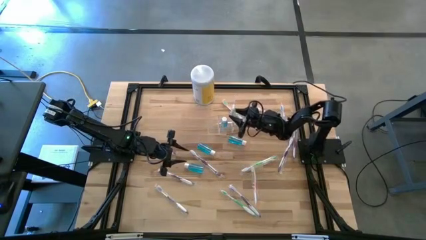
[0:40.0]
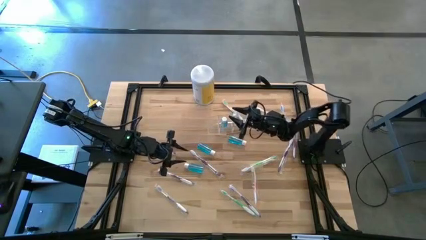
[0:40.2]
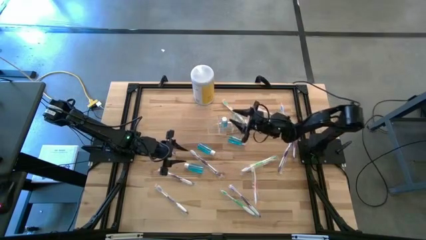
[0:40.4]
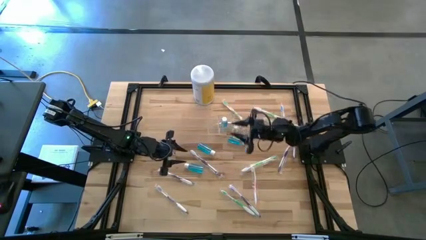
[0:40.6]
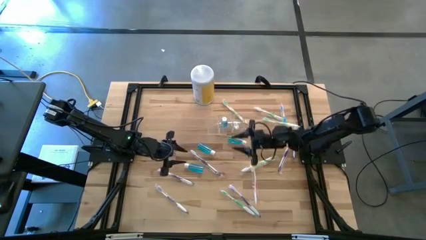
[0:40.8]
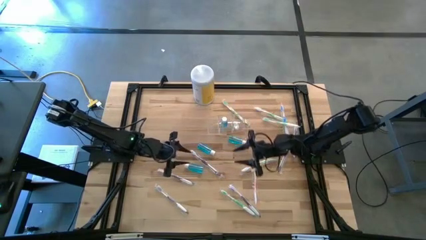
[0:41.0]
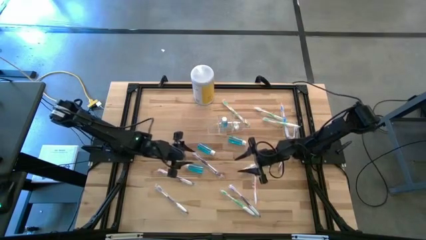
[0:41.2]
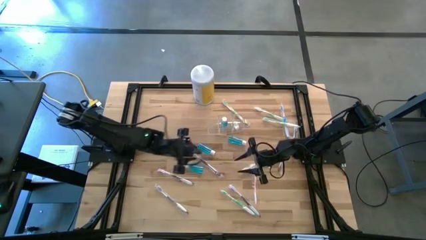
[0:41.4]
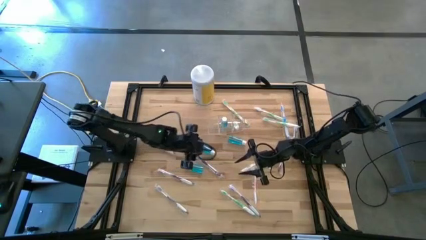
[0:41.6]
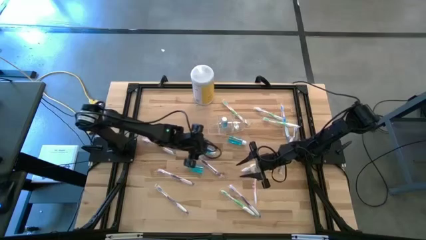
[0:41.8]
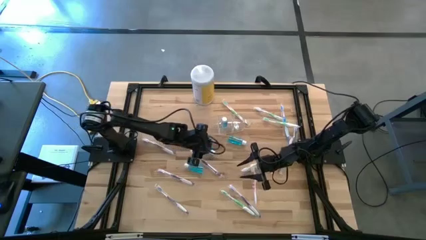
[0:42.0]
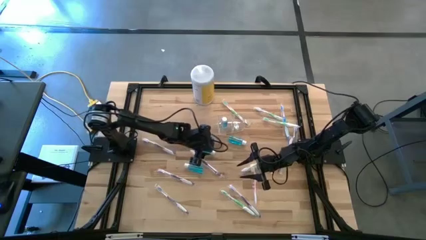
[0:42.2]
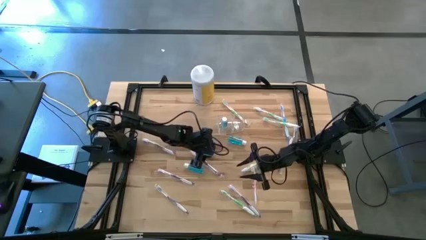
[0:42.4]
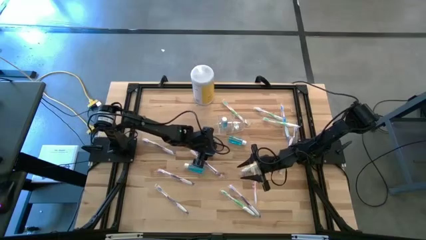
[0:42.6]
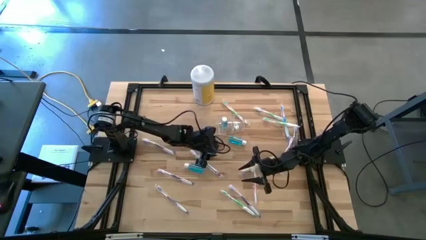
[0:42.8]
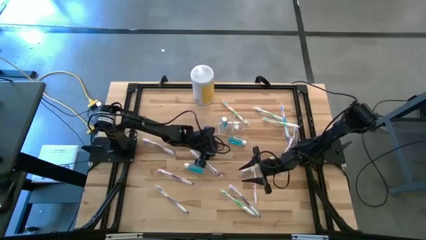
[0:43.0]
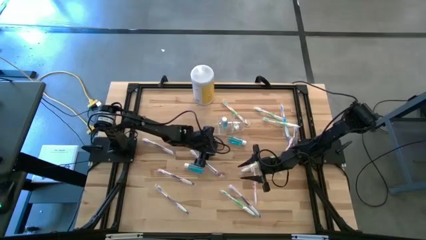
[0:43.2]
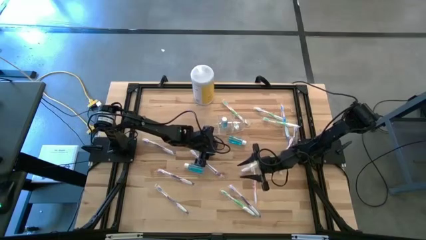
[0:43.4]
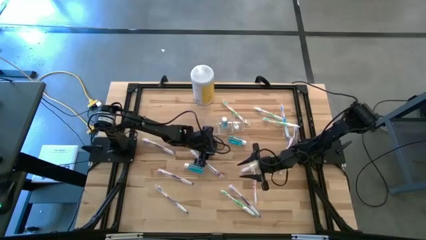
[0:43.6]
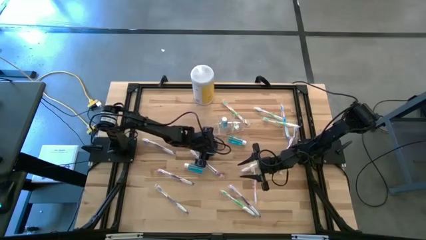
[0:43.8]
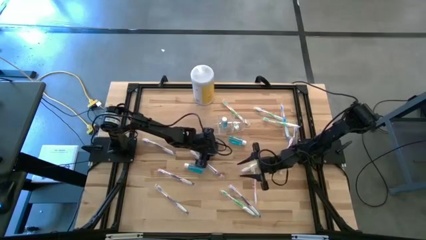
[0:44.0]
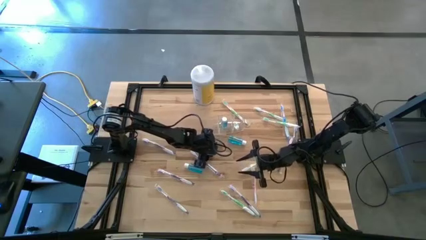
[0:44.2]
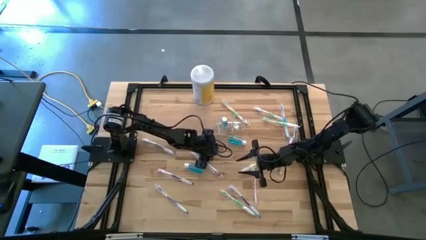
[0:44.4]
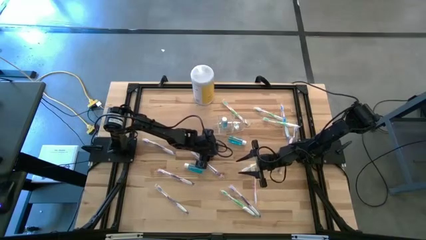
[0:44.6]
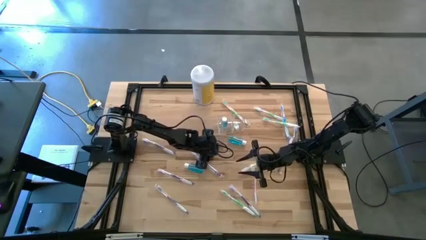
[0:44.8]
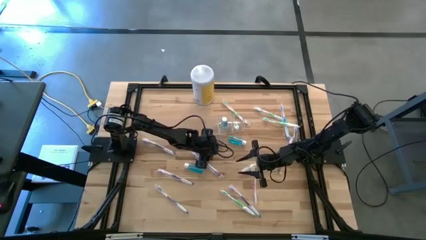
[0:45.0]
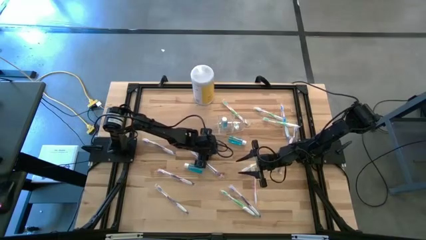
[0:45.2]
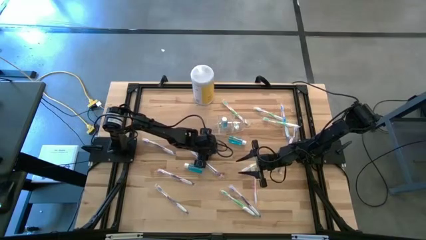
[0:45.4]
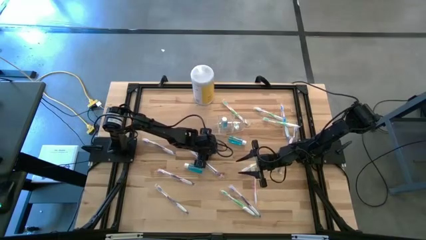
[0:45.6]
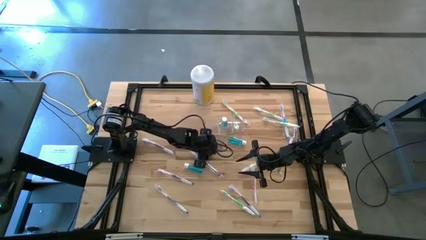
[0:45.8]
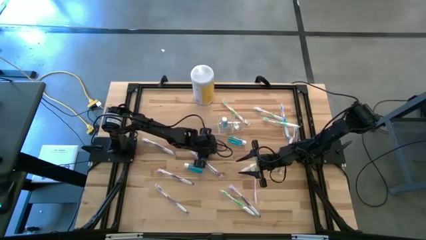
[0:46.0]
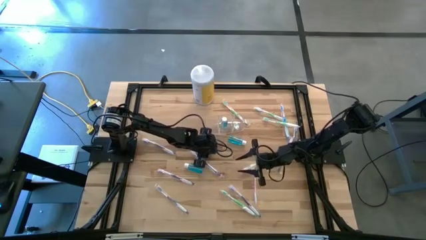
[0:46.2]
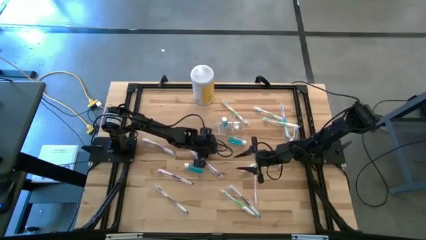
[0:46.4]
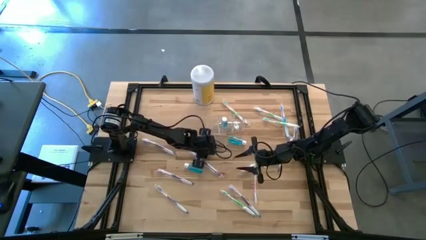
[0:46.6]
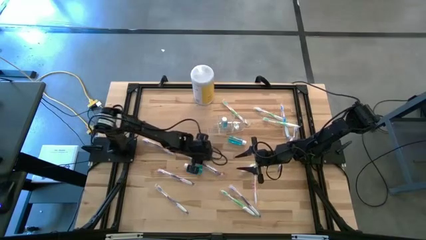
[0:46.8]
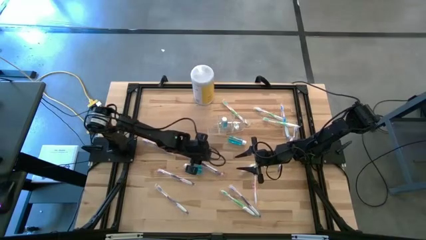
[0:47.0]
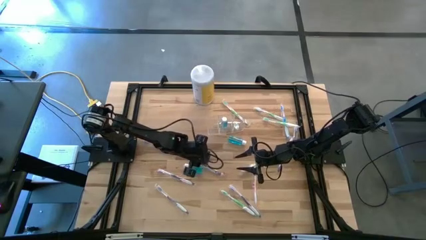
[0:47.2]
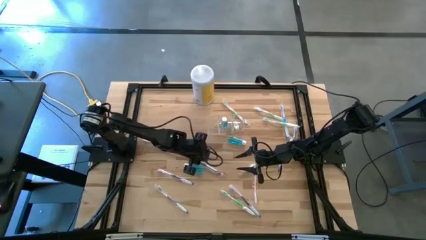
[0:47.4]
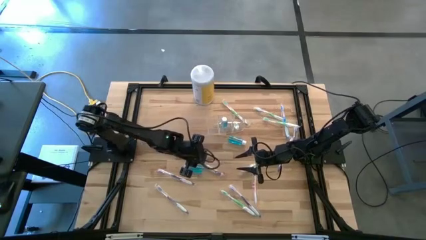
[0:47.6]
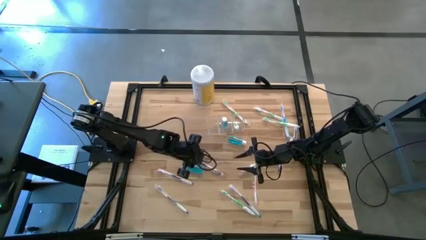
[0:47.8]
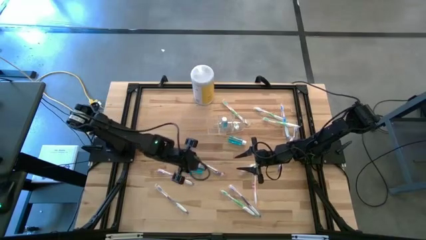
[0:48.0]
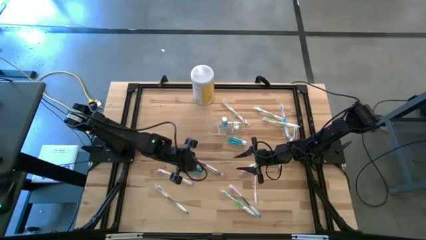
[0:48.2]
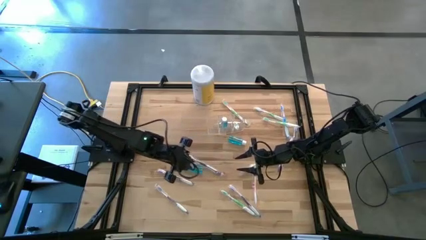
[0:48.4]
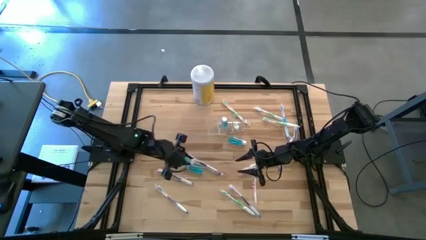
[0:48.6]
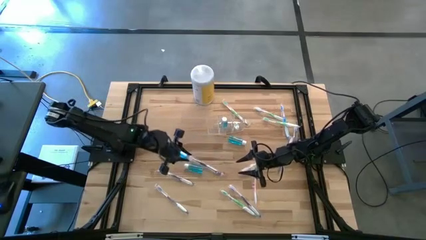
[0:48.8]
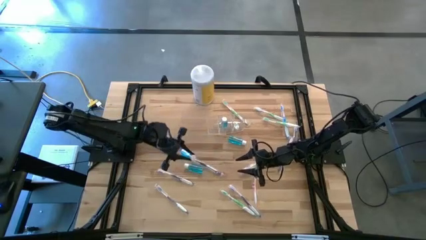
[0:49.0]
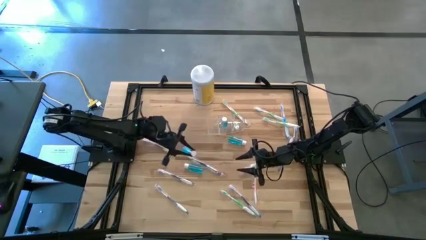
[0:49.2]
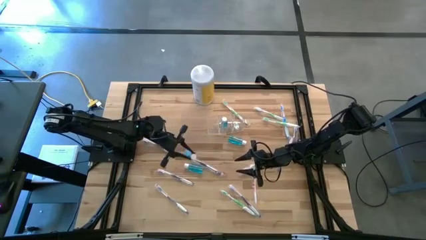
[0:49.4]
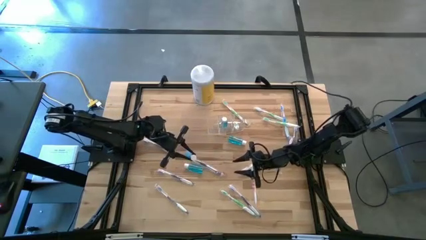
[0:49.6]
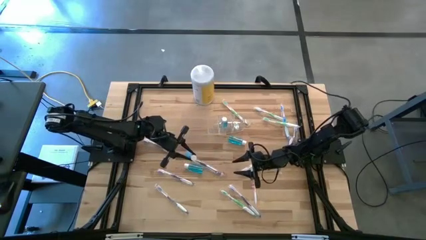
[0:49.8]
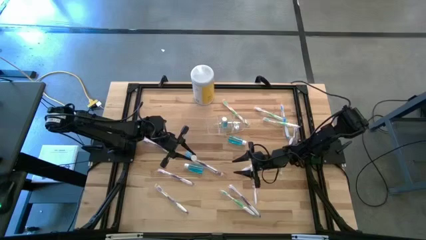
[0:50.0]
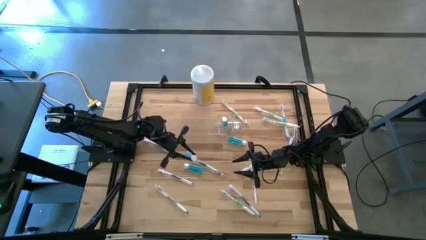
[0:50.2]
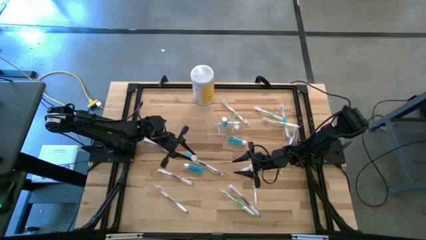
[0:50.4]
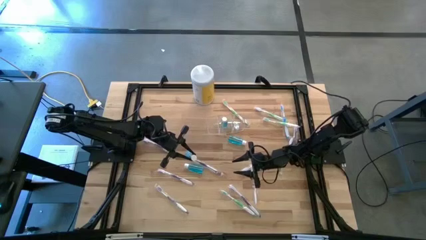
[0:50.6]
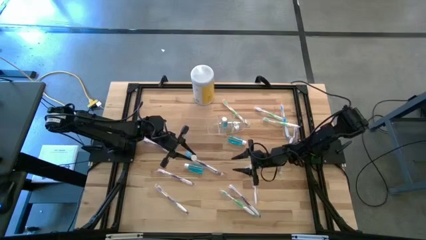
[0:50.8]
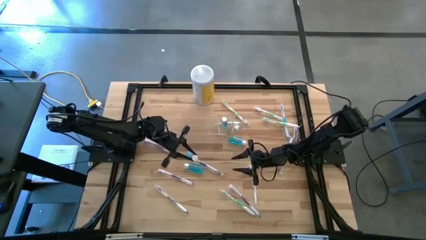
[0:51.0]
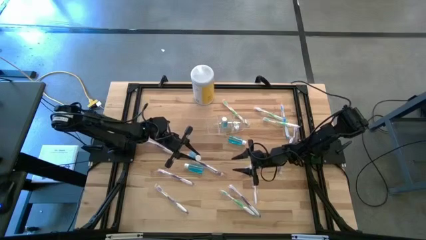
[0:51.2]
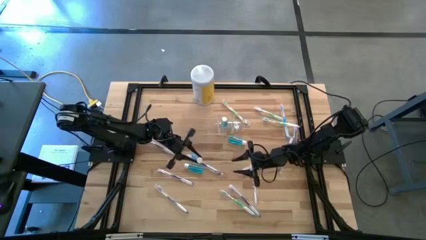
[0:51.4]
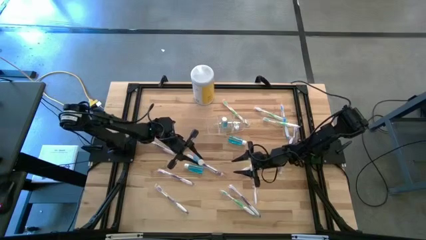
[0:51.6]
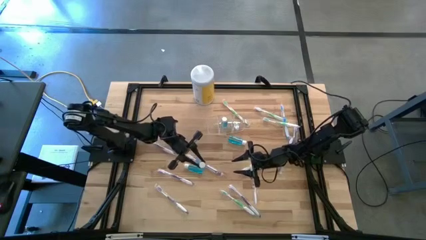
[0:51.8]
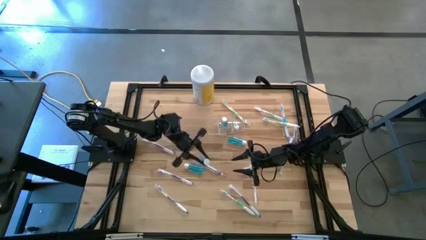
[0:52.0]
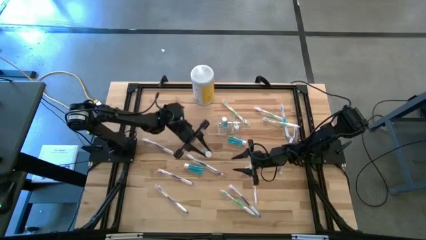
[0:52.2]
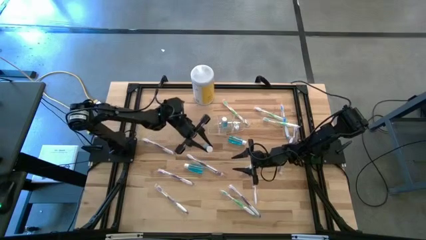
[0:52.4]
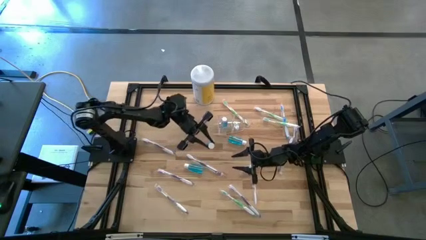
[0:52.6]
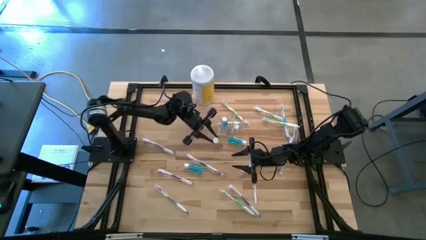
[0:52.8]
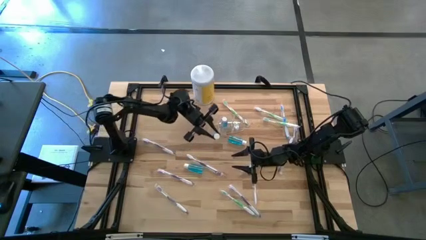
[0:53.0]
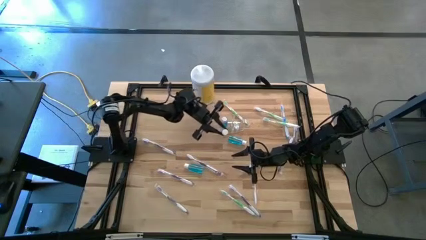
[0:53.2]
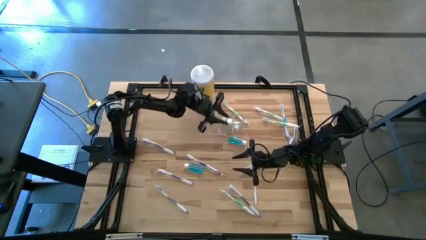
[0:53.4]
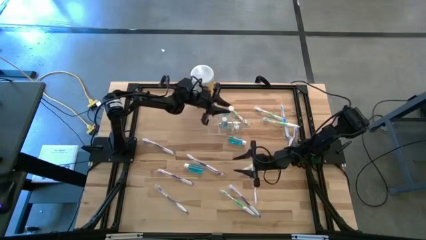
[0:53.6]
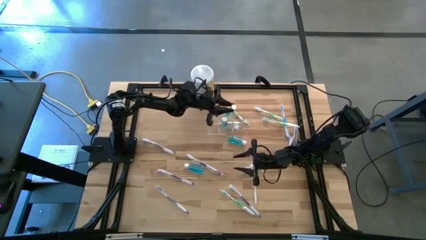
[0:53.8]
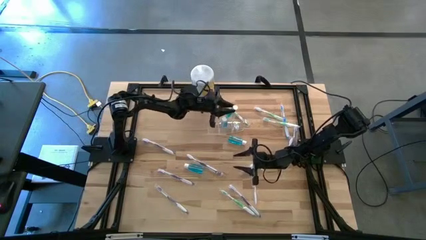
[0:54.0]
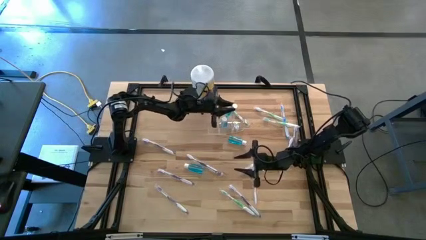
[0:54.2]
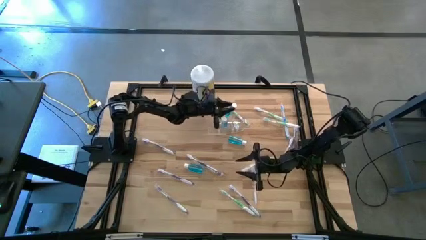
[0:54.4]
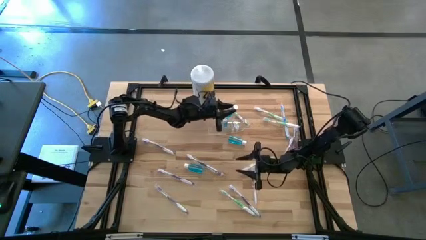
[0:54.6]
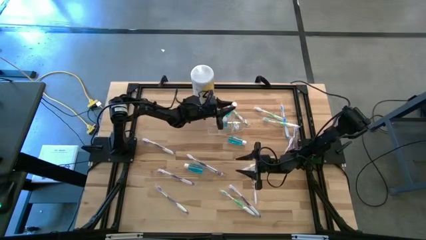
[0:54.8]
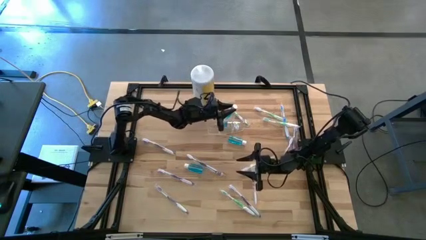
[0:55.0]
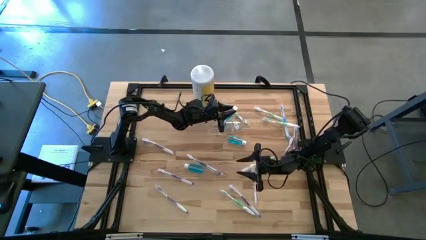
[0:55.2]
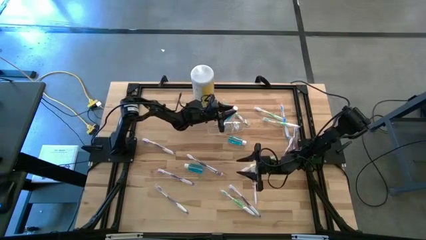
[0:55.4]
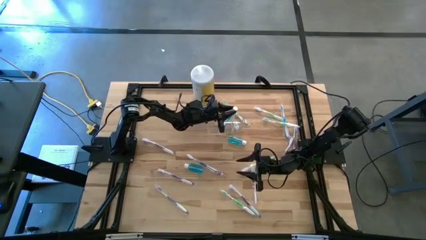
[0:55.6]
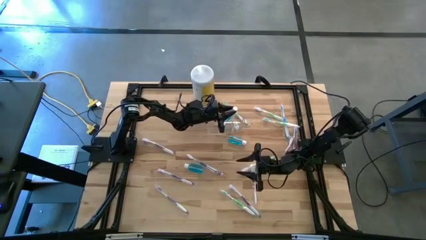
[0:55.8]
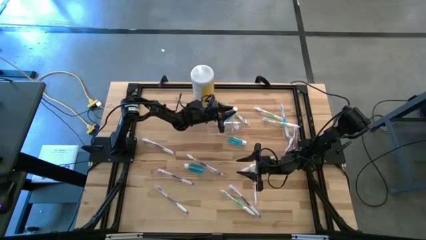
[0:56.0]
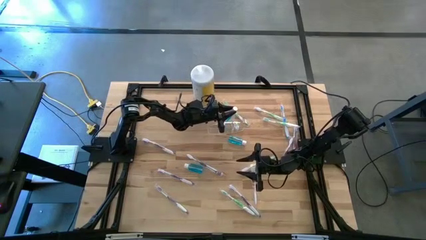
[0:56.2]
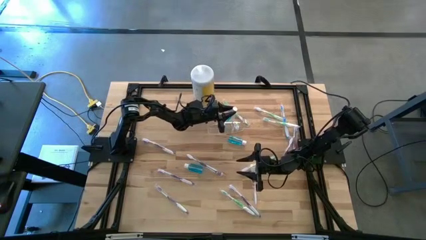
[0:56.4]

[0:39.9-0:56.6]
Task: Pick & Place toothbrushing station
Put the top left mouthwash into the transparent organizer
